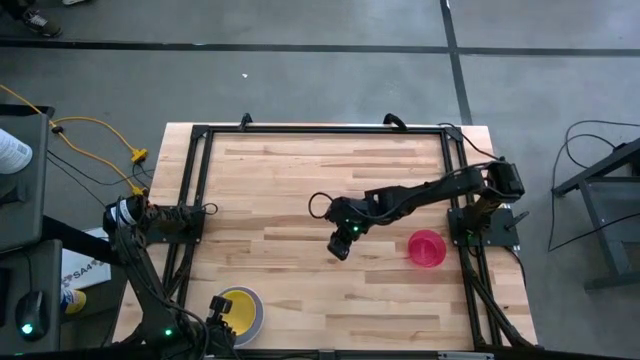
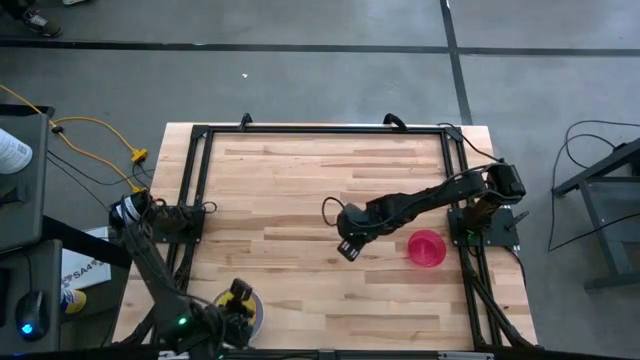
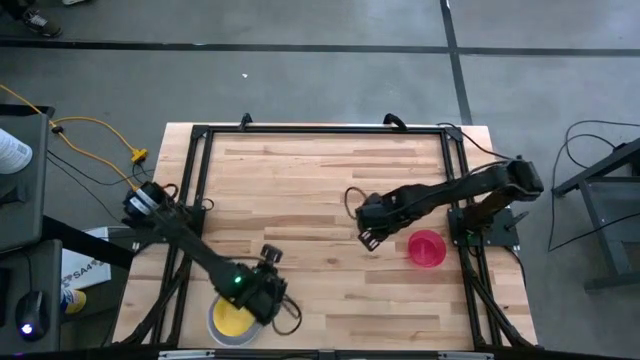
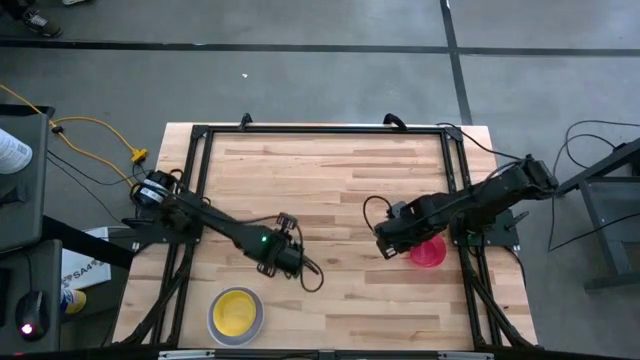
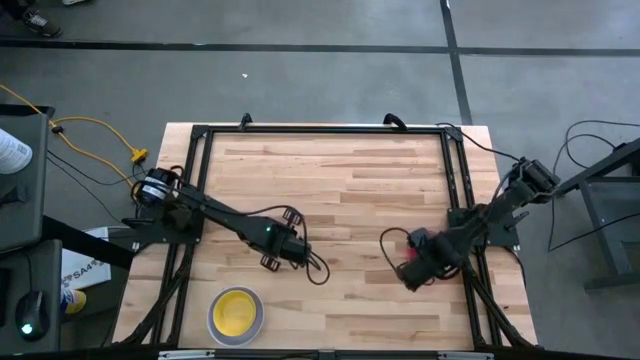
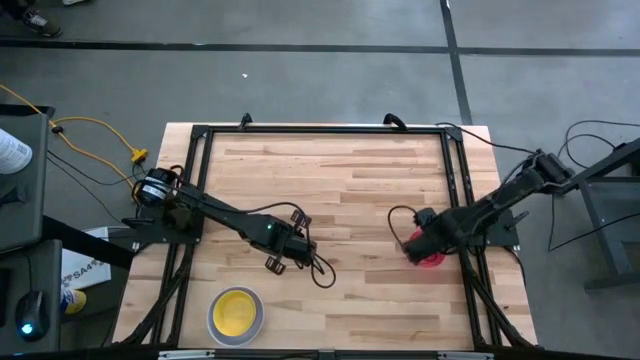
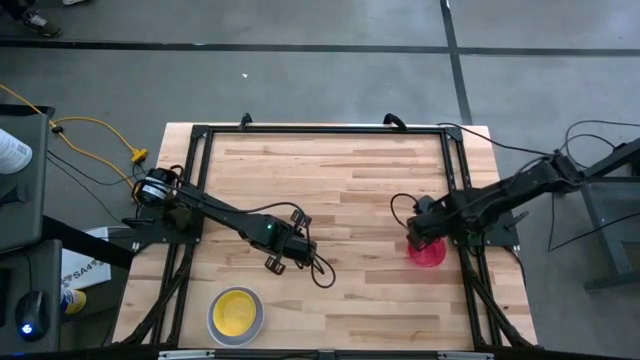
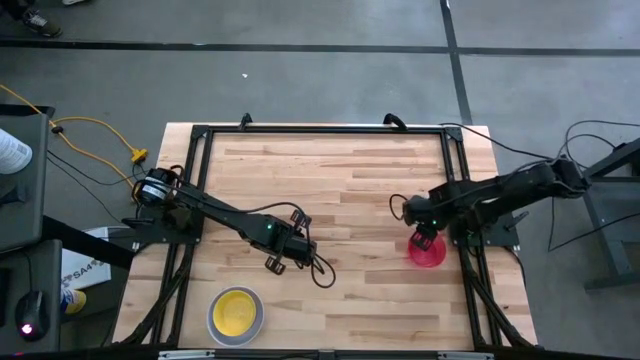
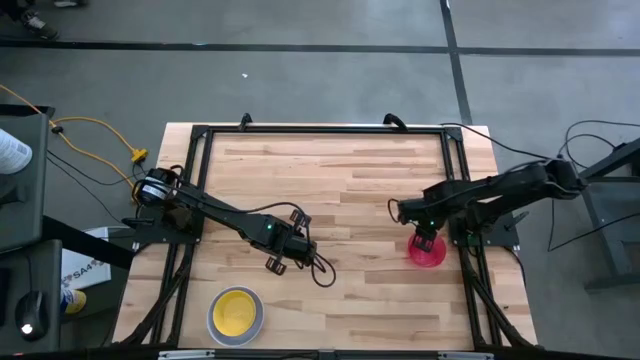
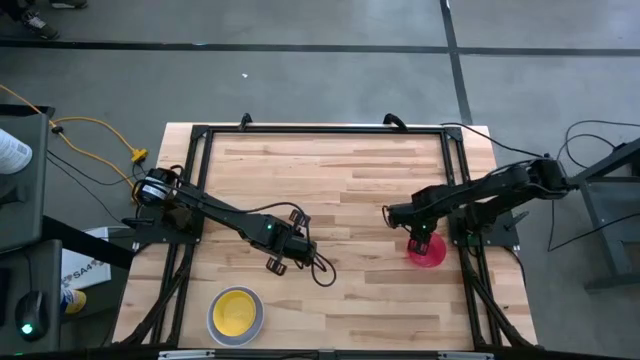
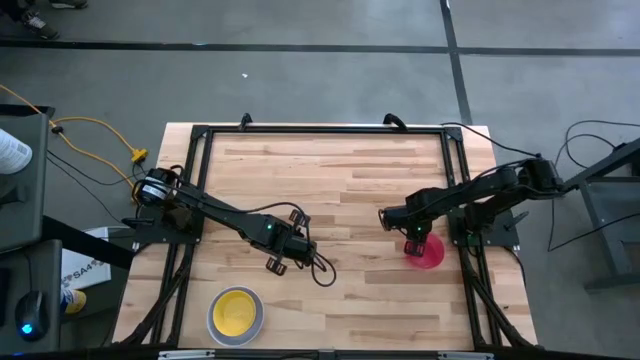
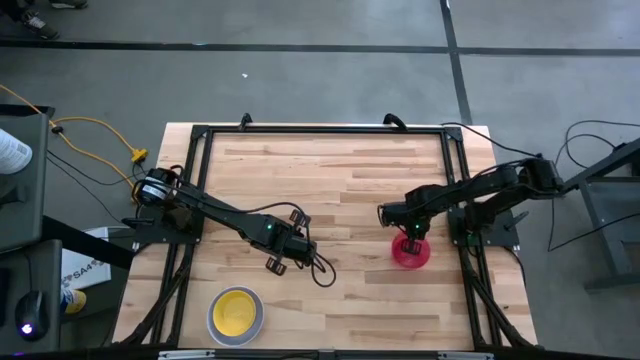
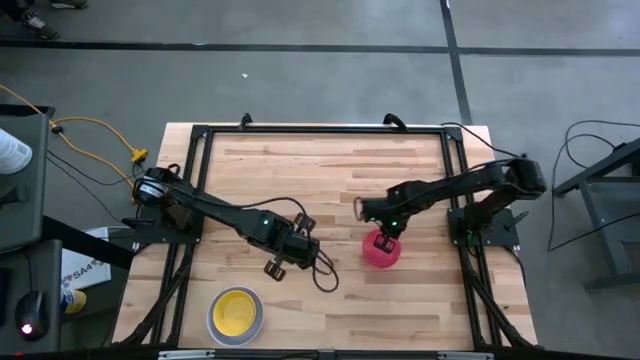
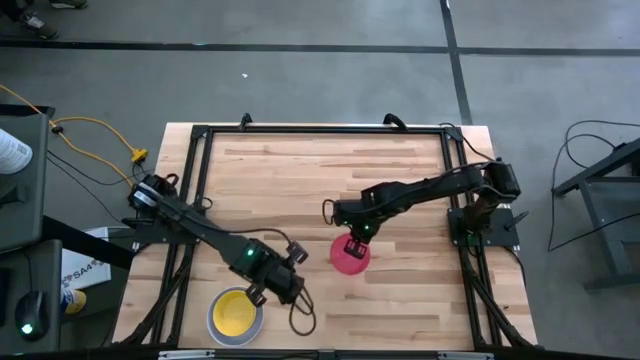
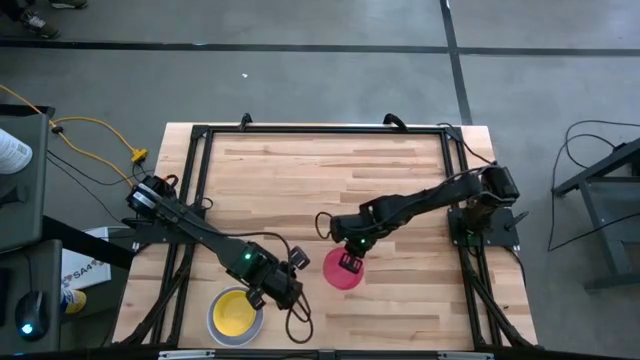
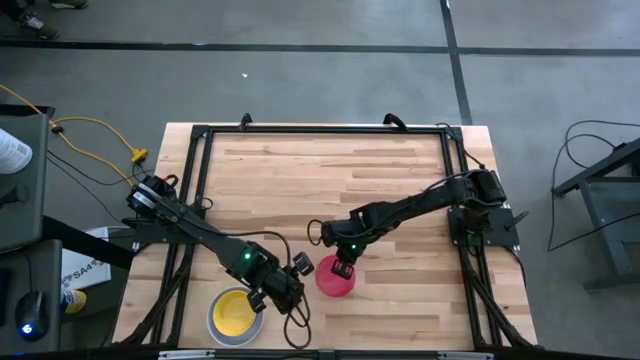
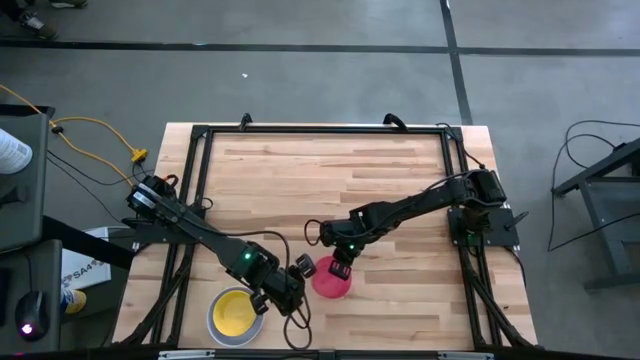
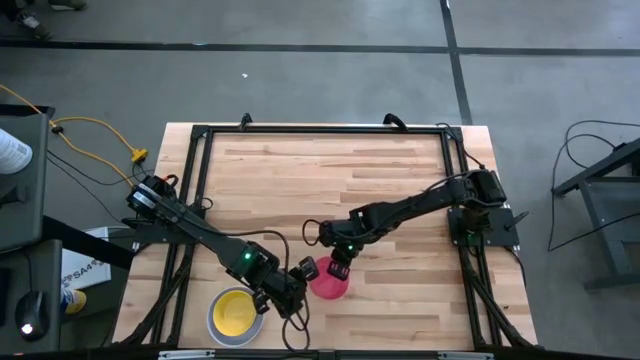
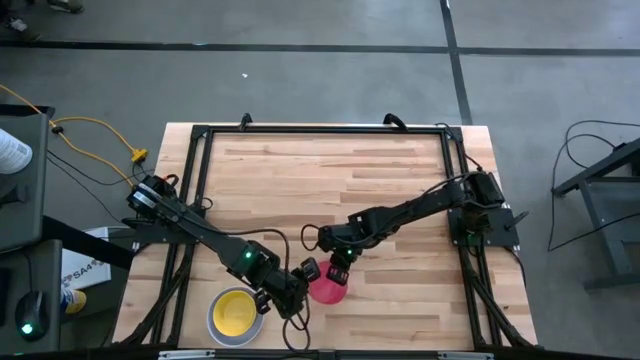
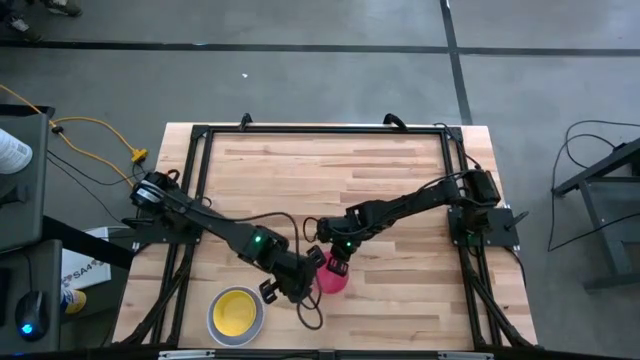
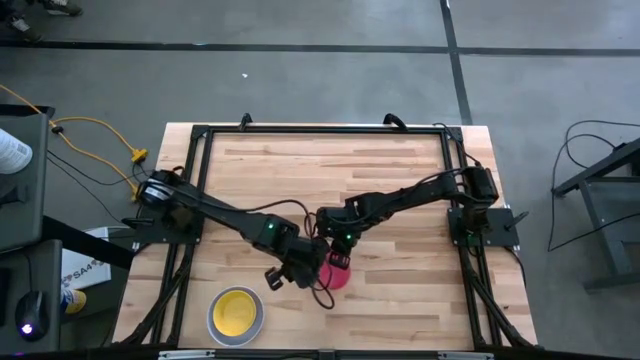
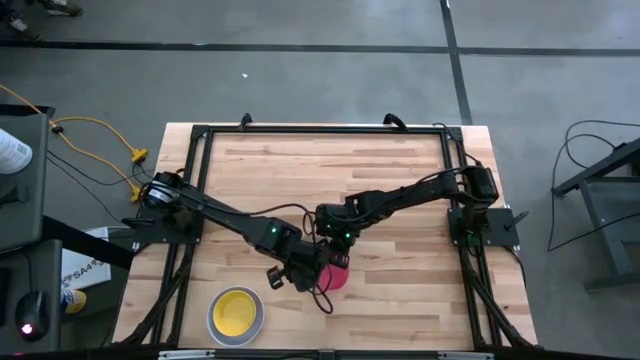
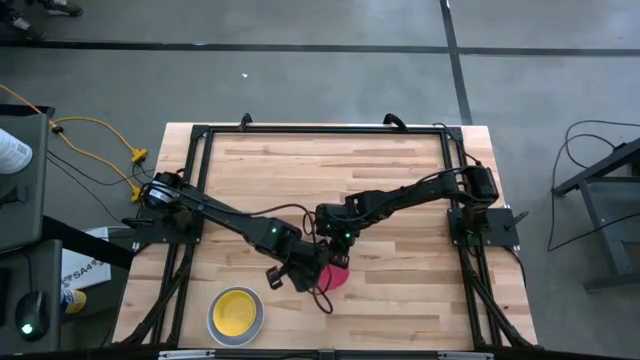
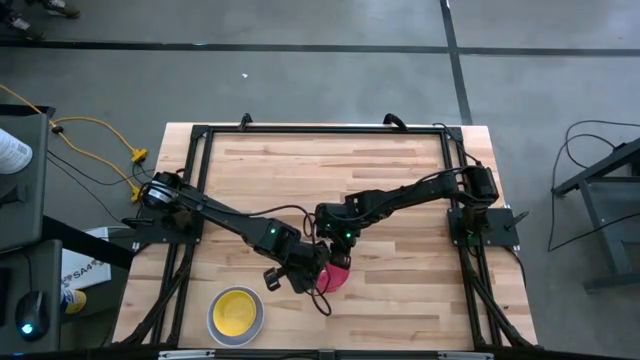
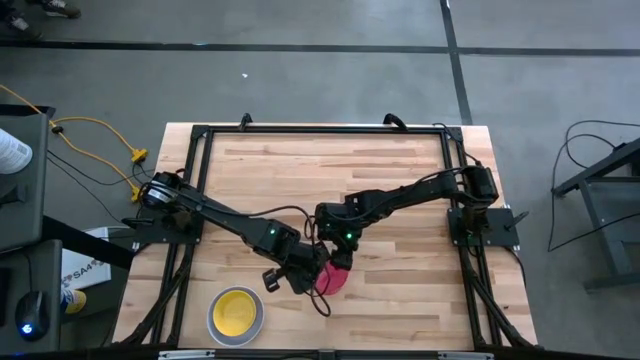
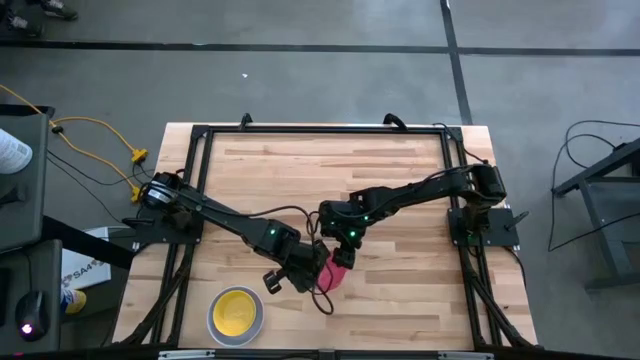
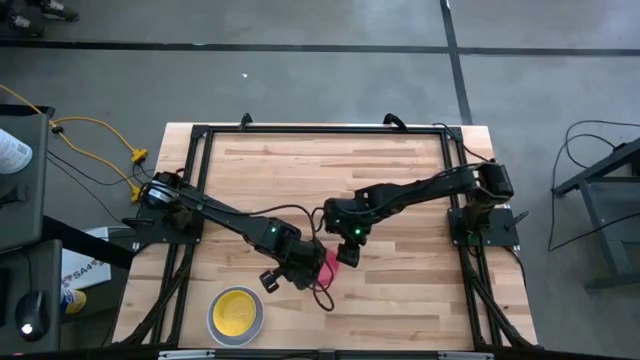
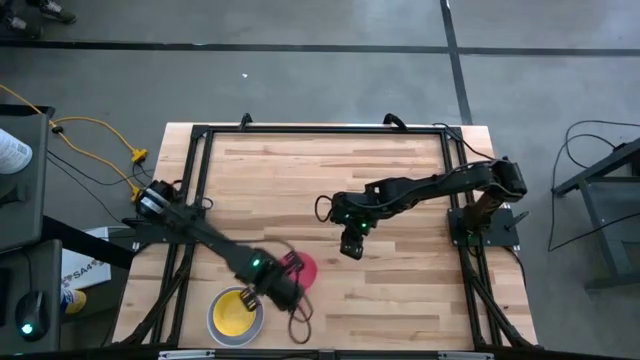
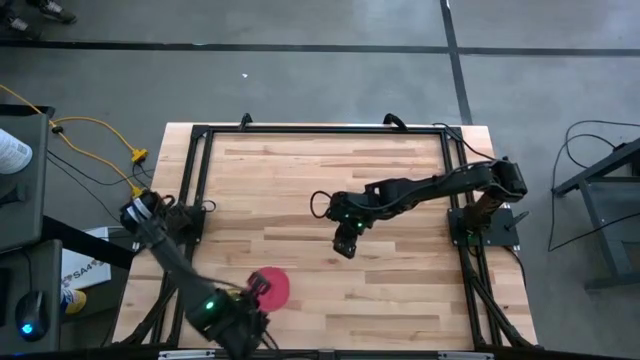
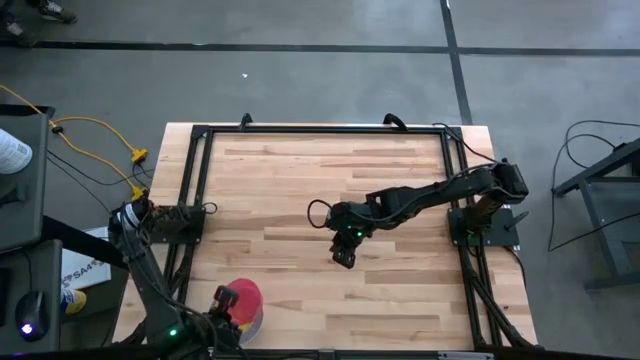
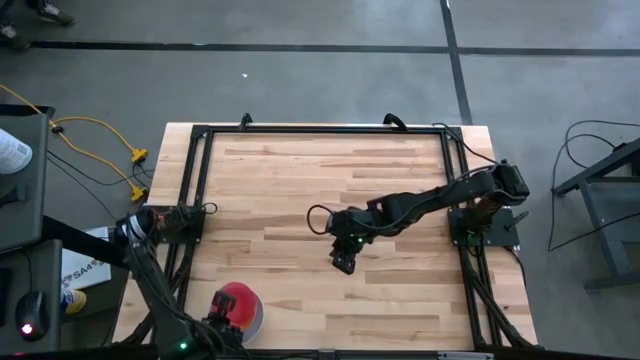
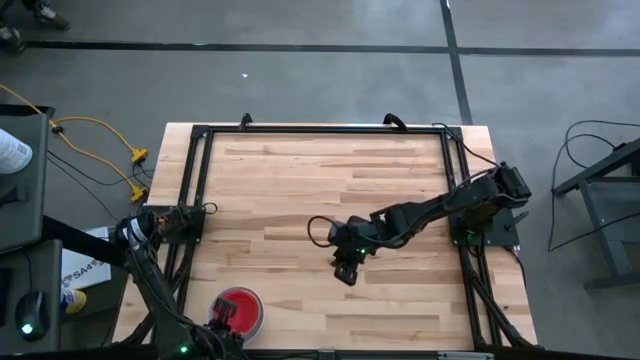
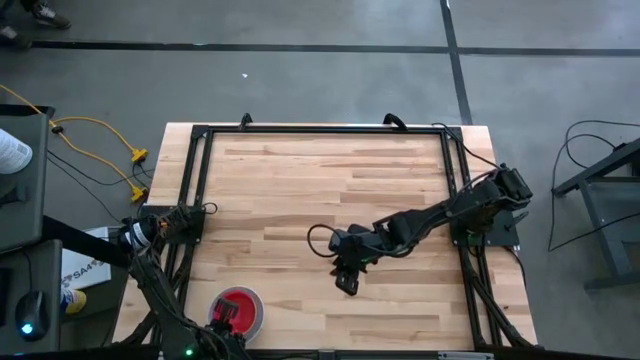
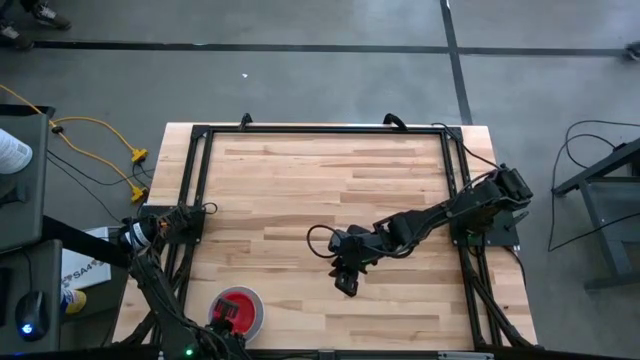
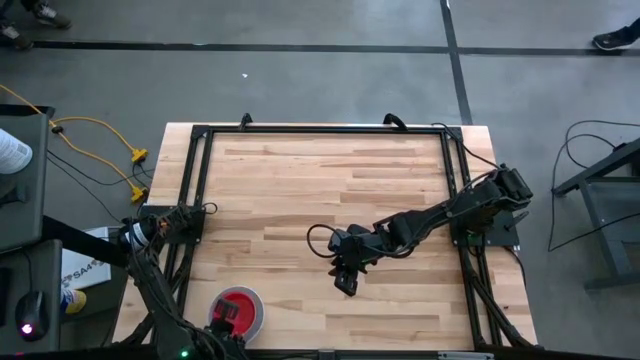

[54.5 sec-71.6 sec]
Stack the pink bowl on the yellow bowl
